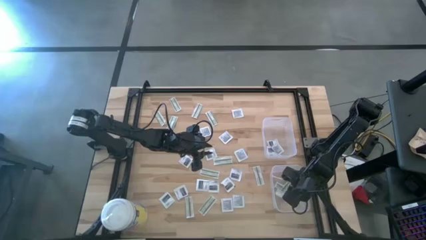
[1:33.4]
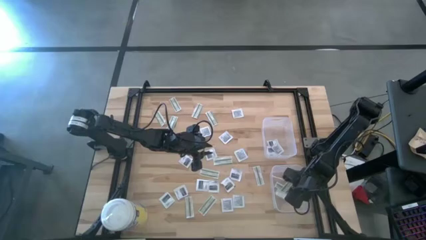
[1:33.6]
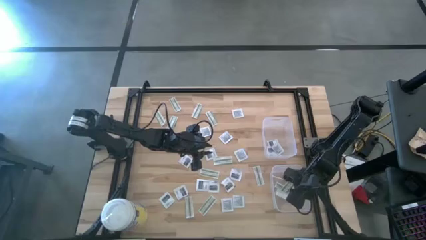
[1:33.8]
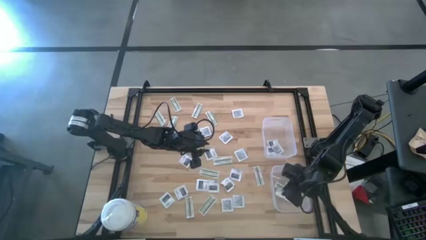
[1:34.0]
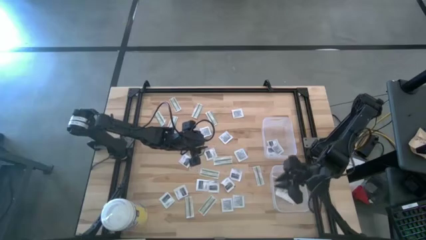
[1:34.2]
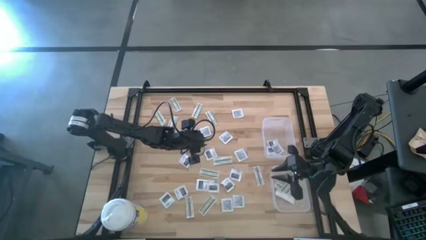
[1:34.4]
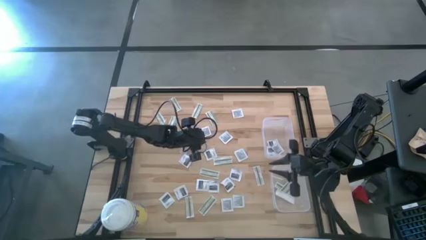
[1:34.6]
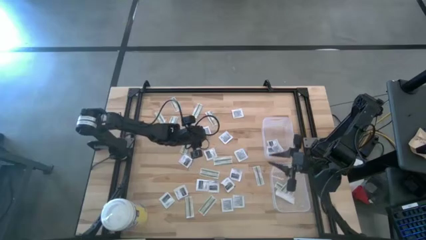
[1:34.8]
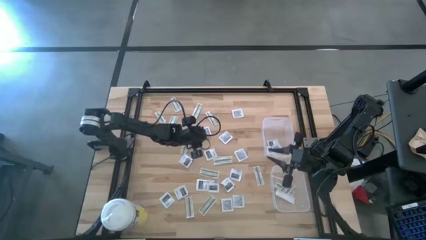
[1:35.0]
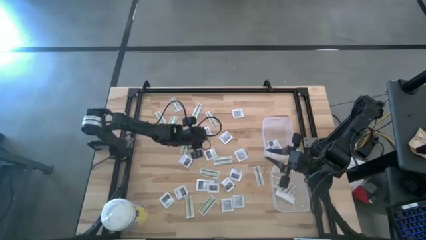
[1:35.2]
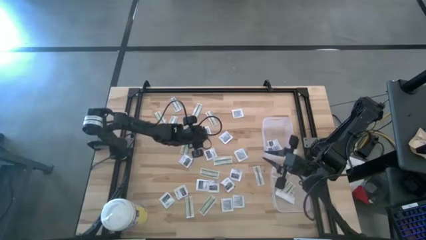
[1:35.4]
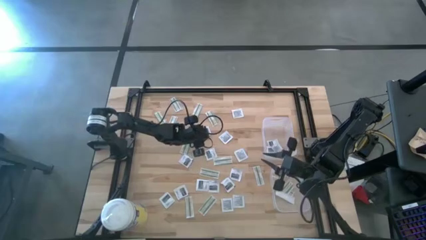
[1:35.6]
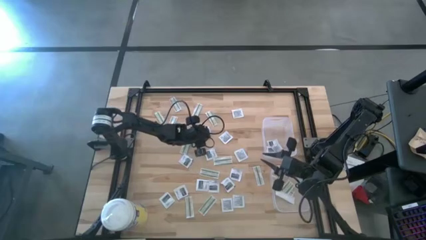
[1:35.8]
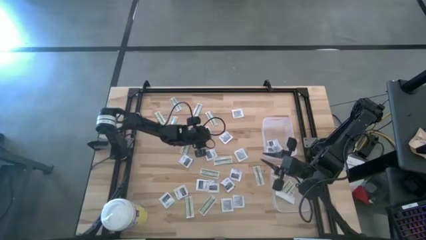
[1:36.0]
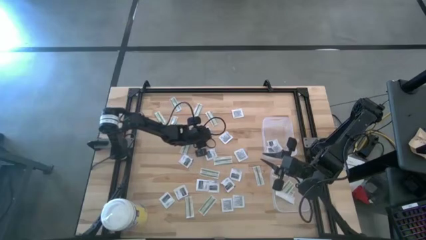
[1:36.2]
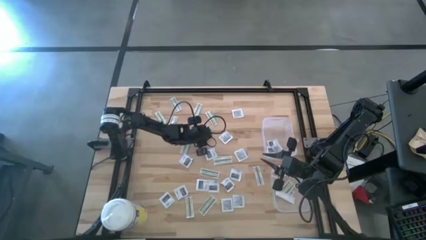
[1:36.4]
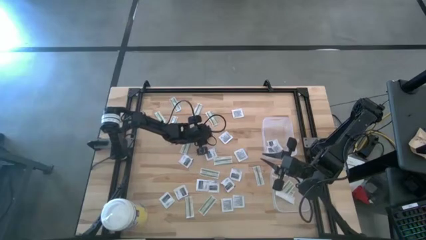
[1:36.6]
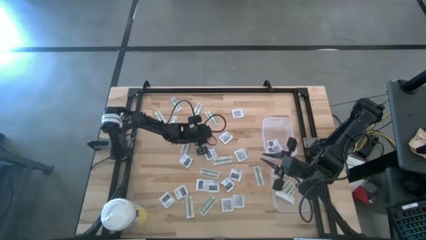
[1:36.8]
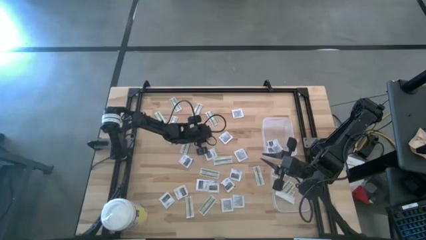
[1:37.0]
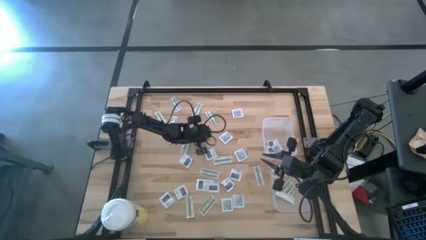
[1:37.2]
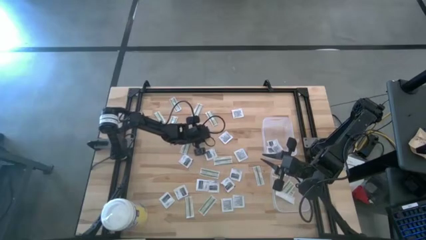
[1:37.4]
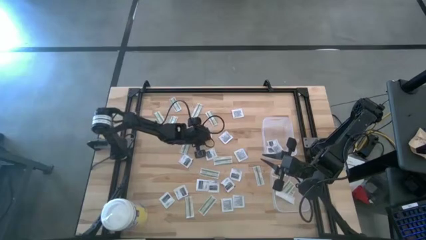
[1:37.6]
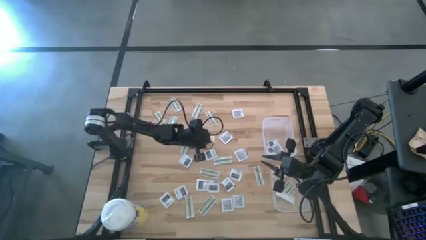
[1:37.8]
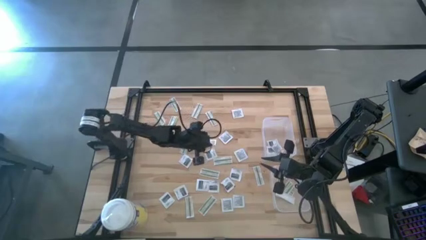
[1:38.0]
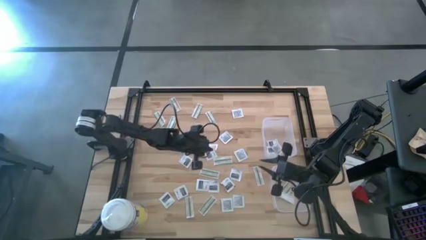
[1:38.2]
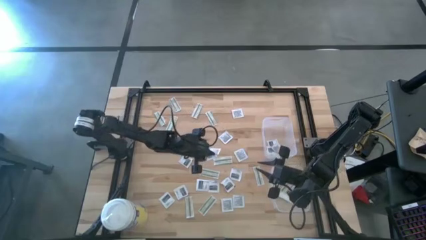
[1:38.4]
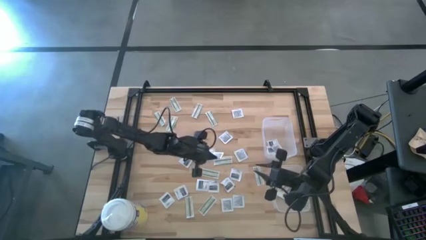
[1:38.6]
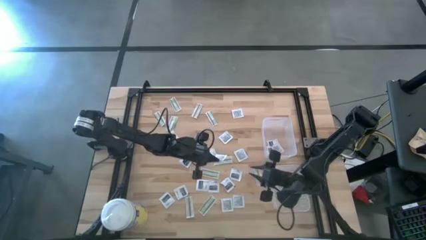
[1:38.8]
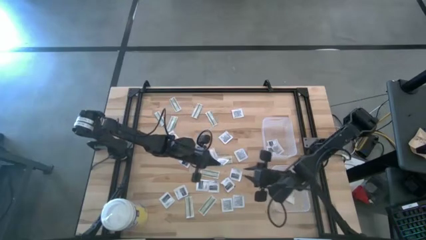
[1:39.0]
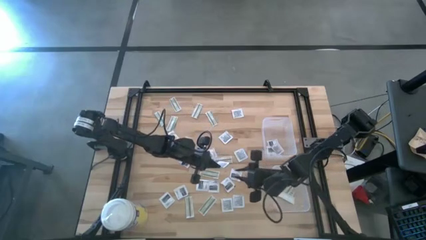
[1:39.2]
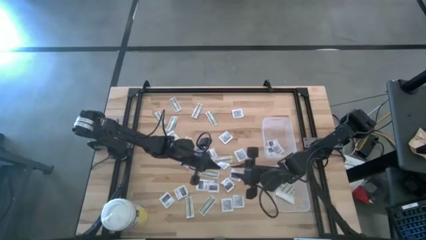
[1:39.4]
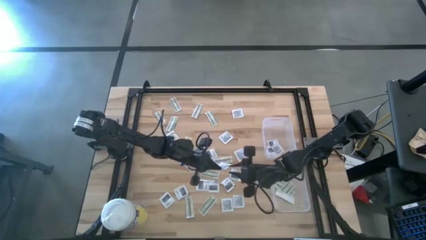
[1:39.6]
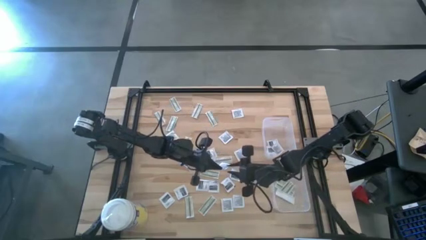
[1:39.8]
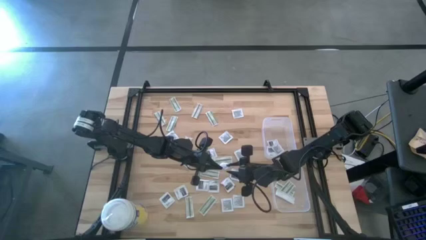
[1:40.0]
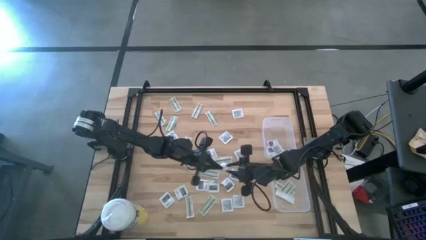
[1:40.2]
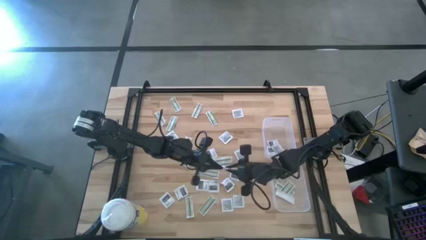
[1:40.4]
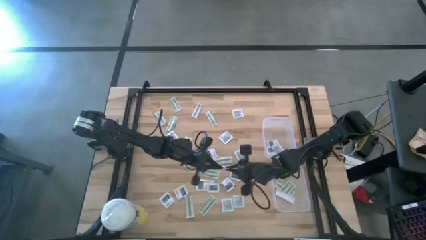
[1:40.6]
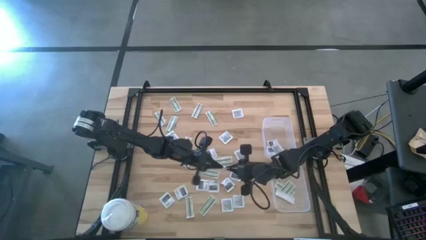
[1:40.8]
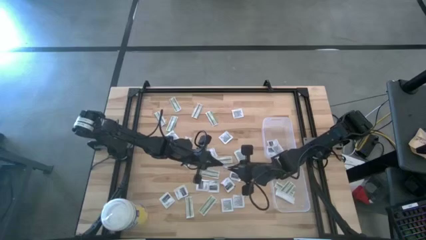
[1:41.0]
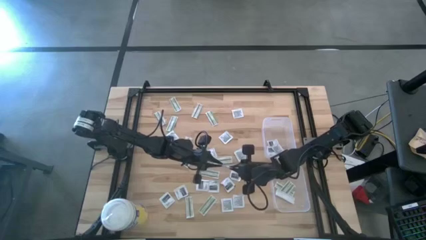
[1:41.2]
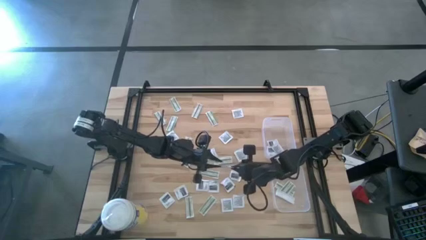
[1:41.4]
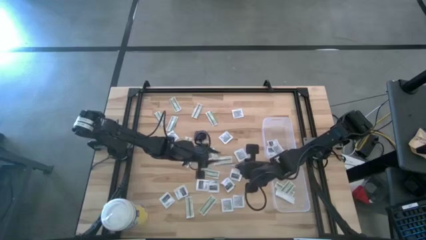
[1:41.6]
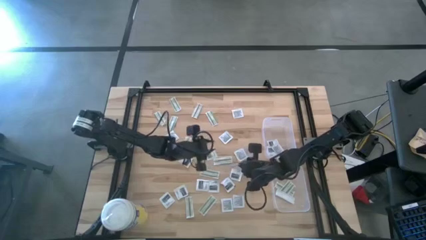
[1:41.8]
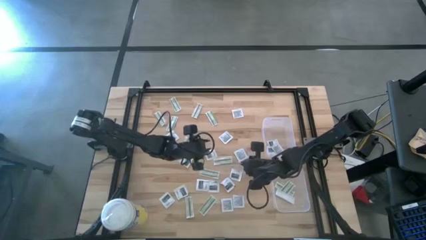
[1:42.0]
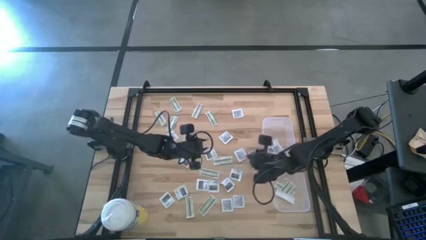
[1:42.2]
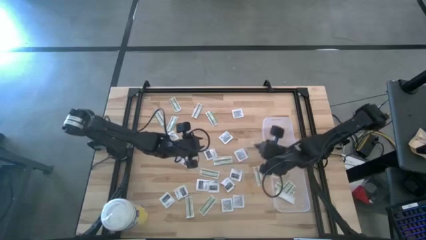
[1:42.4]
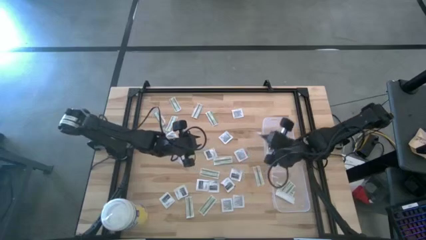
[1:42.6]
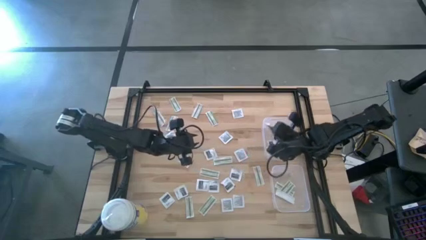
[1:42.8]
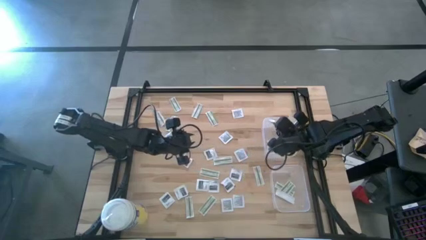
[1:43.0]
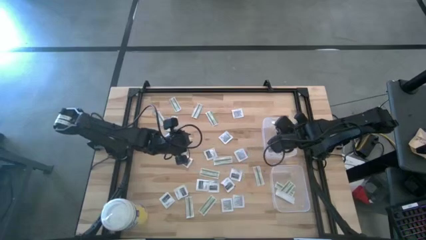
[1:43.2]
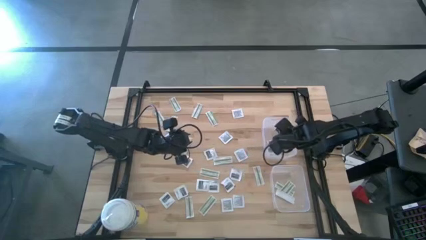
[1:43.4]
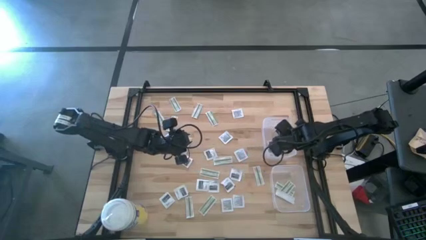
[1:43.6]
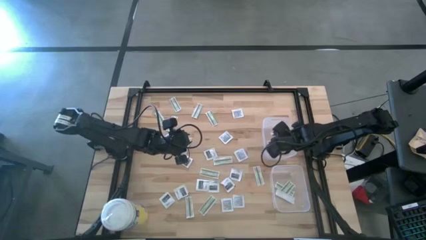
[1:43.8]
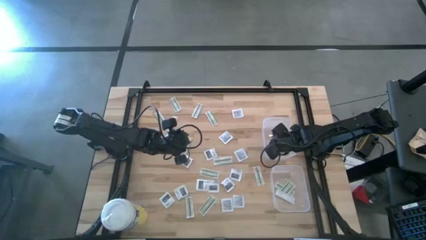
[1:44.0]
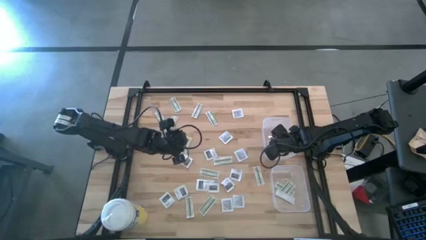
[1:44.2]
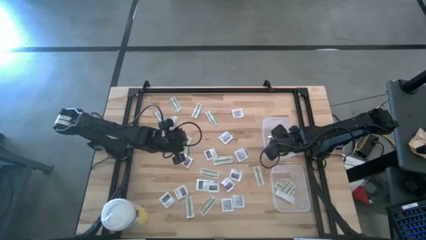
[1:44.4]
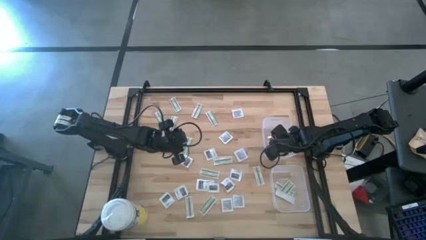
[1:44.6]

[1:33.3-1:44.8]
Task: Pick & Place First Aid Supplies
Put the towelette pack into the top bin
